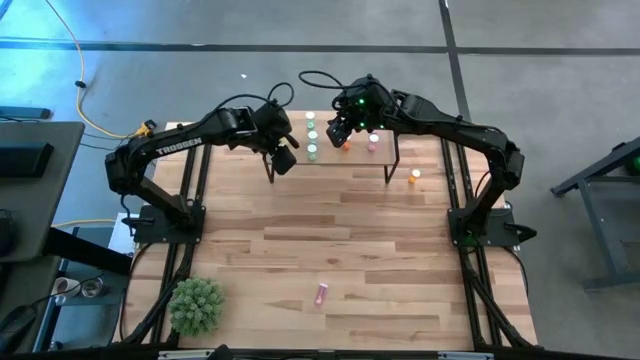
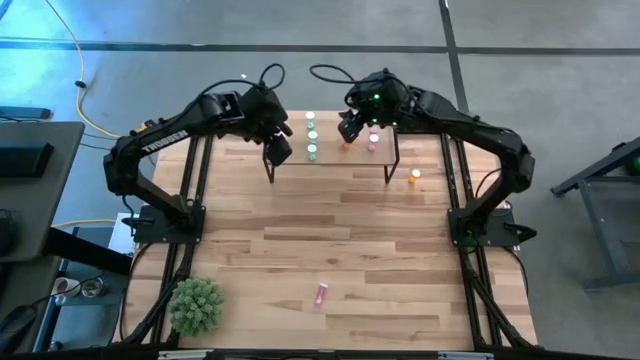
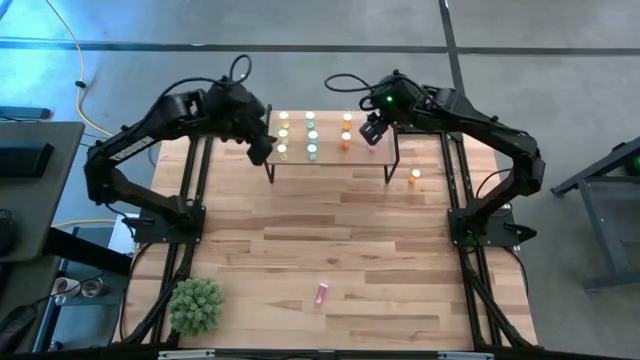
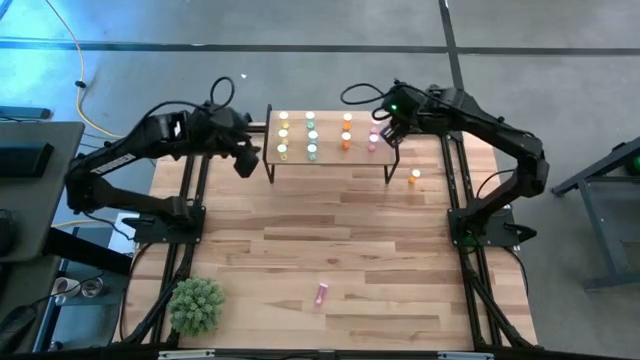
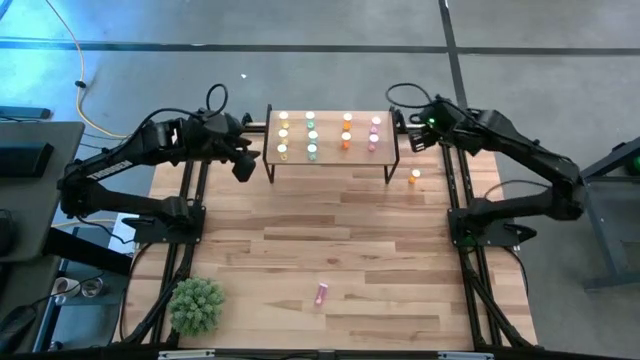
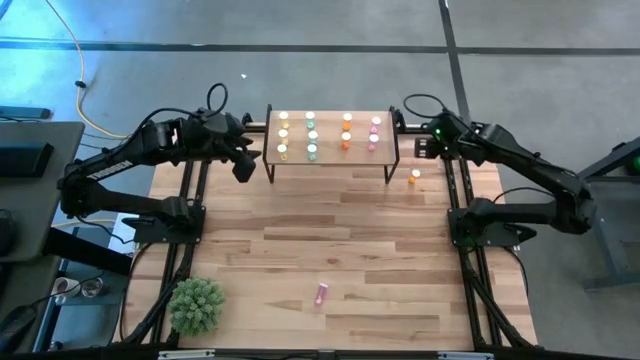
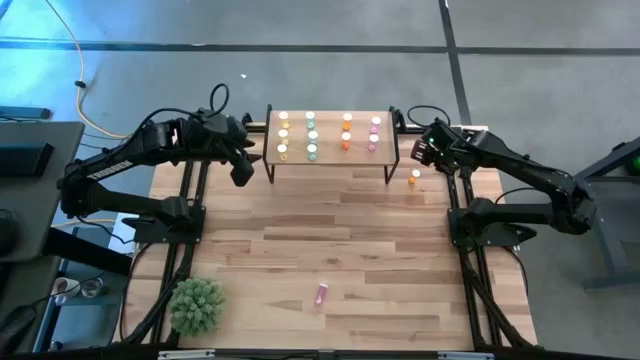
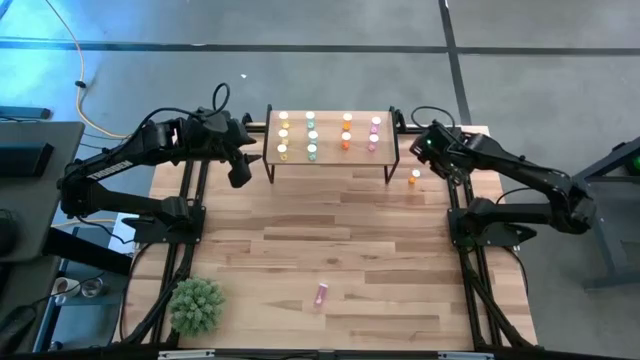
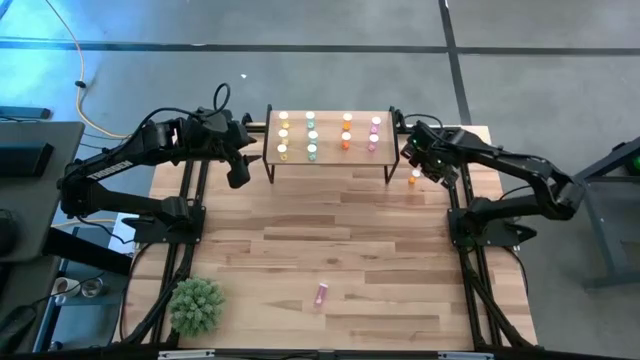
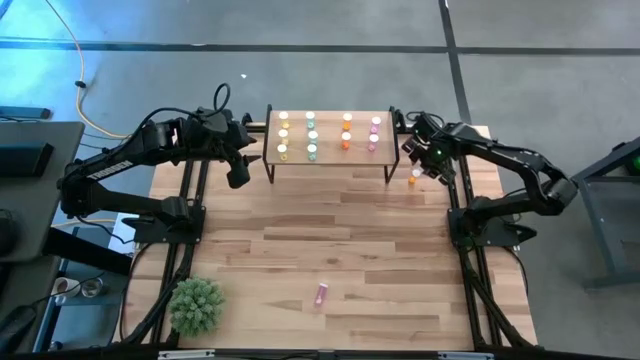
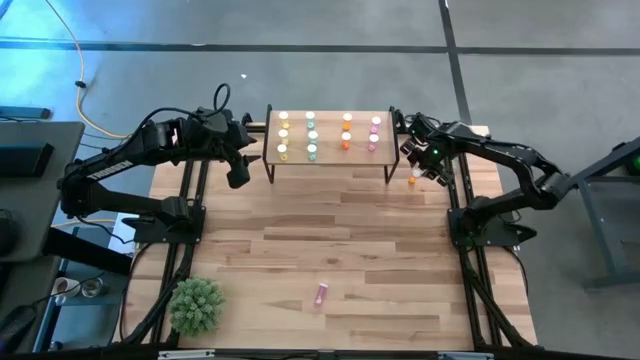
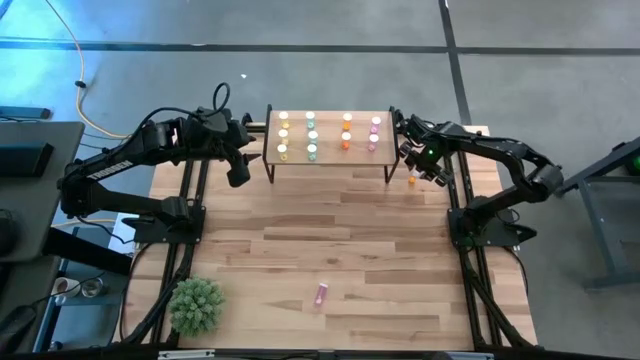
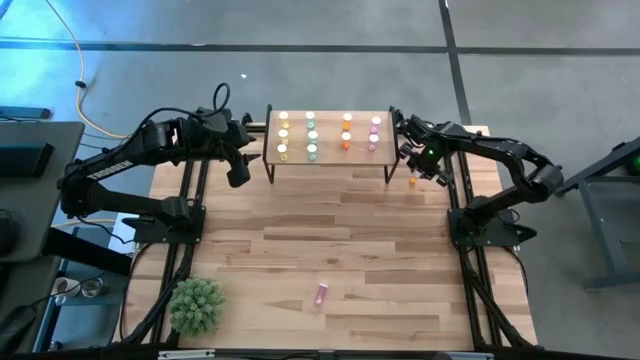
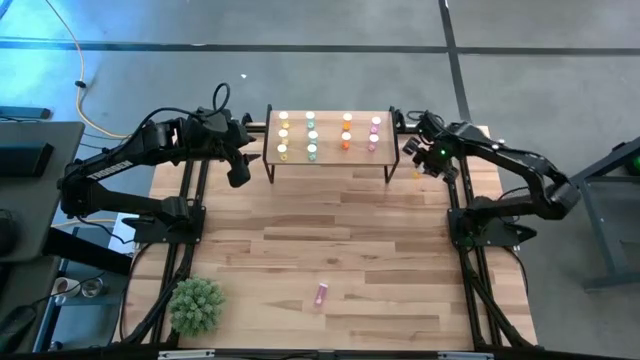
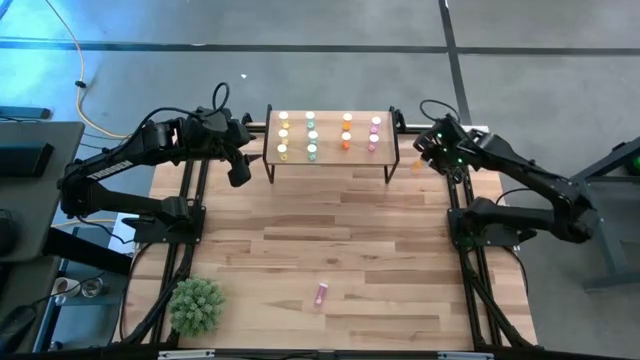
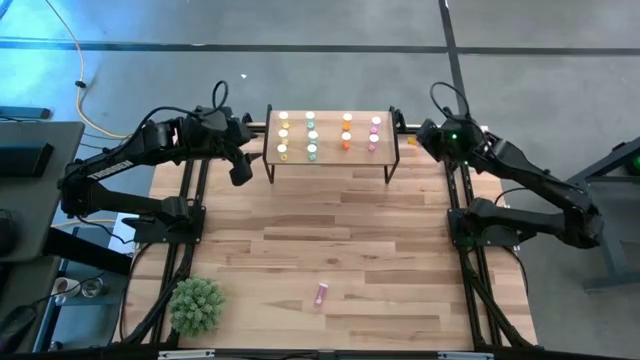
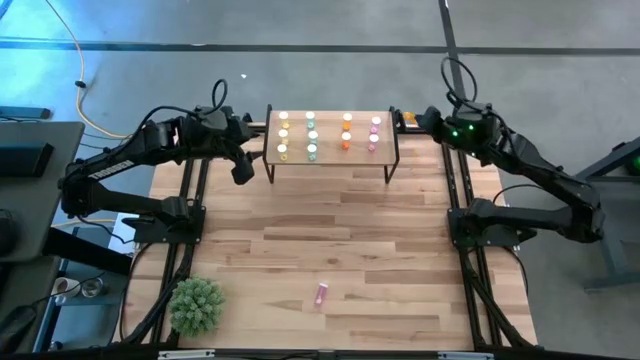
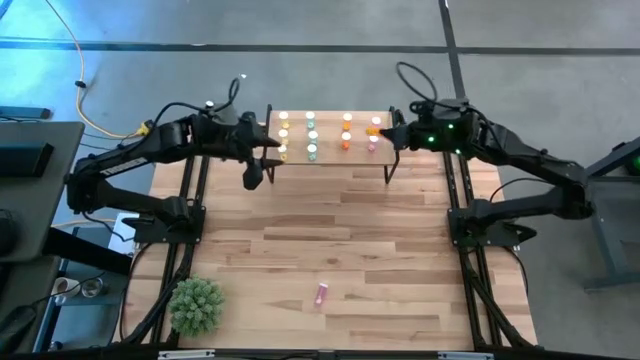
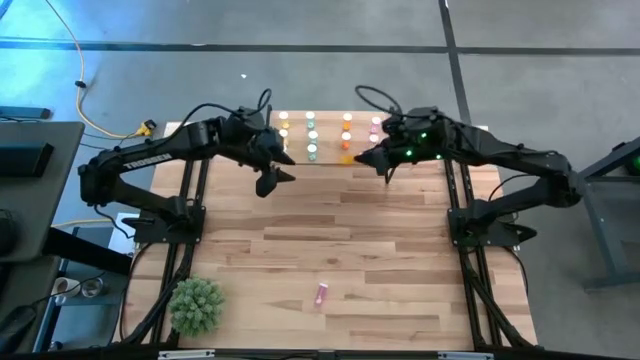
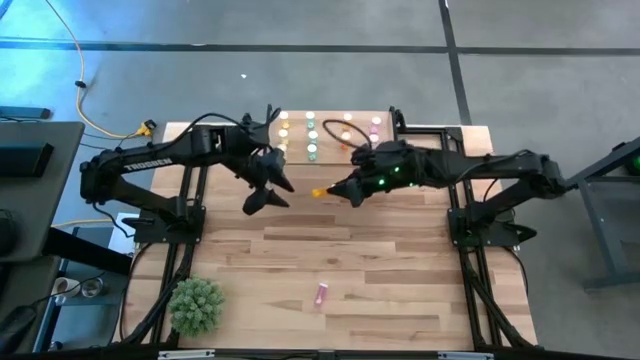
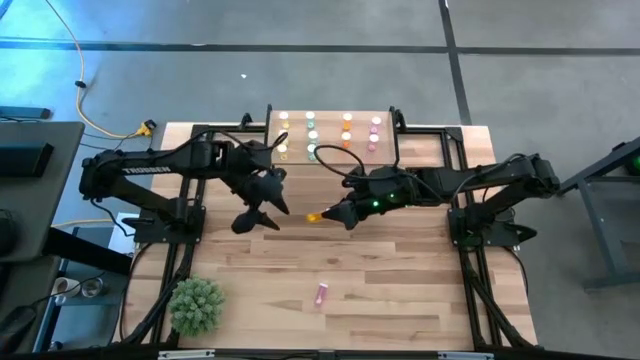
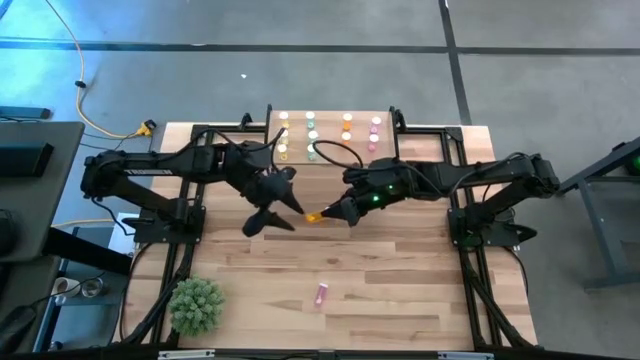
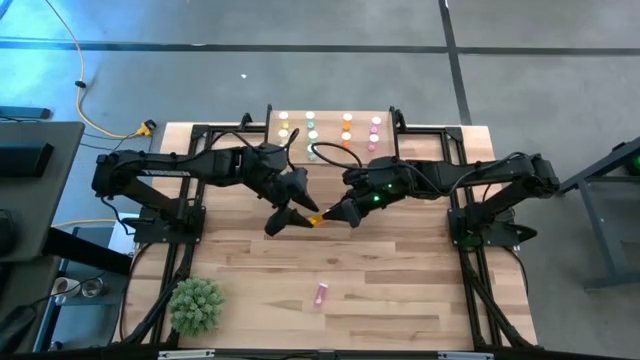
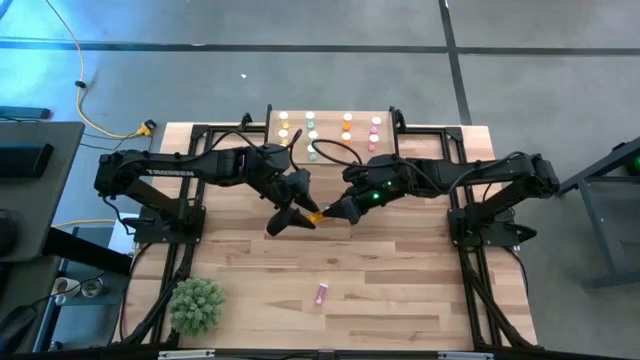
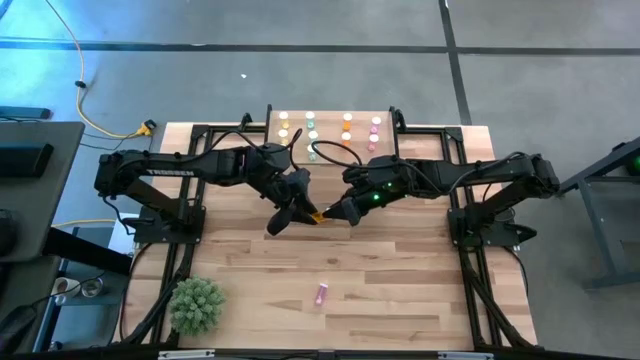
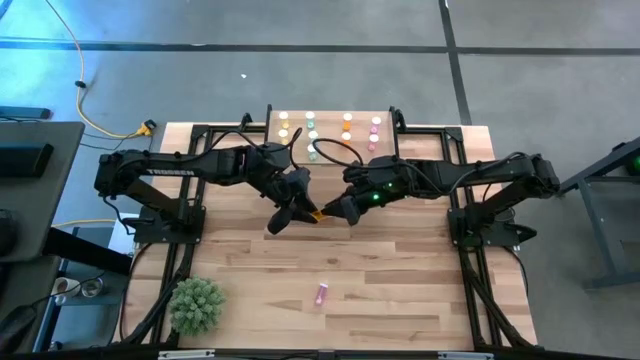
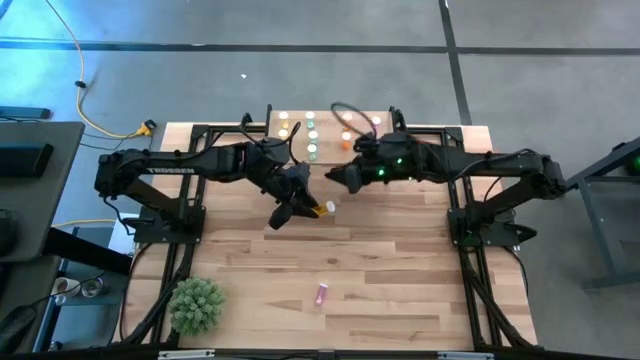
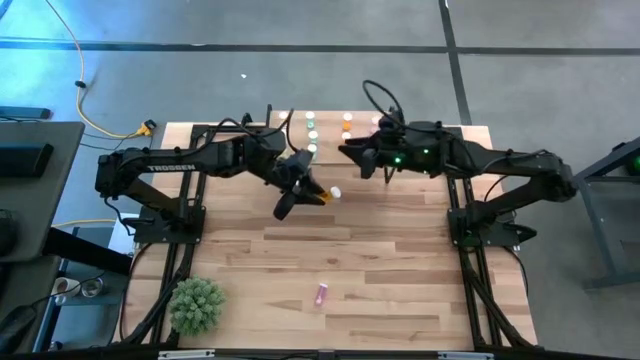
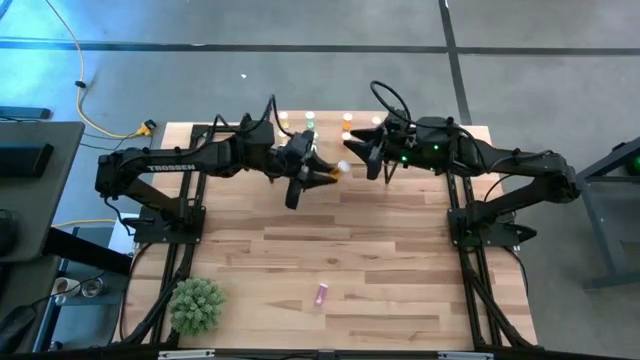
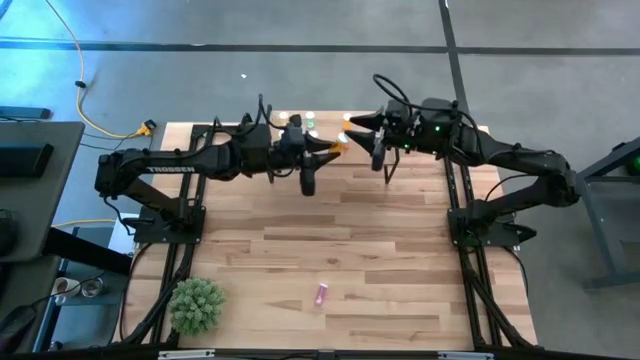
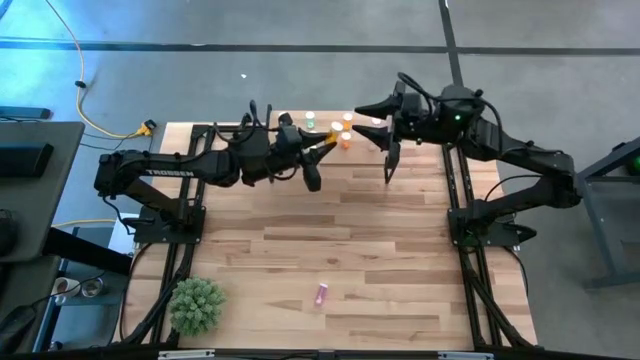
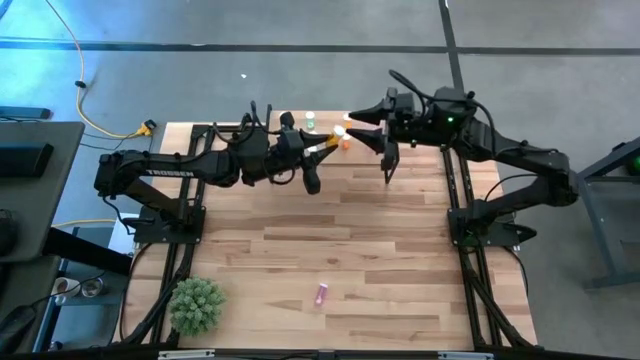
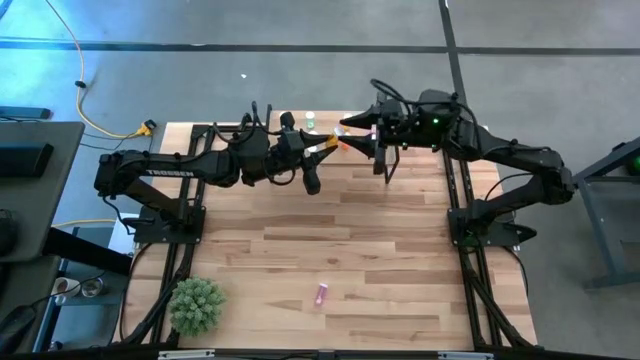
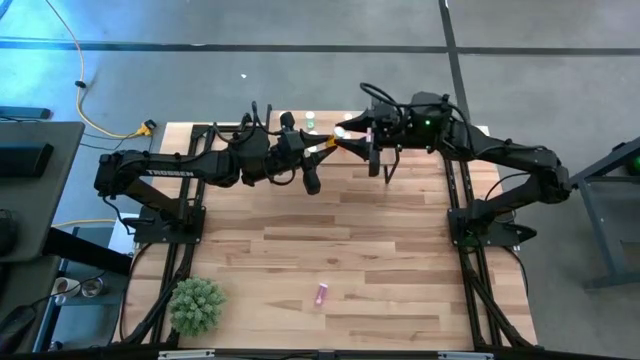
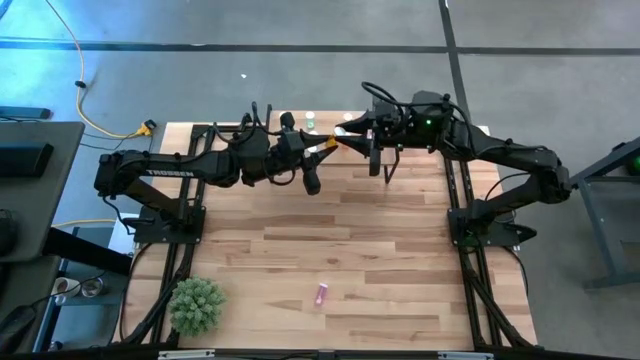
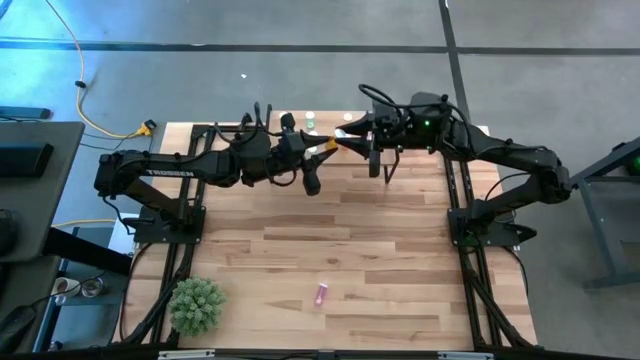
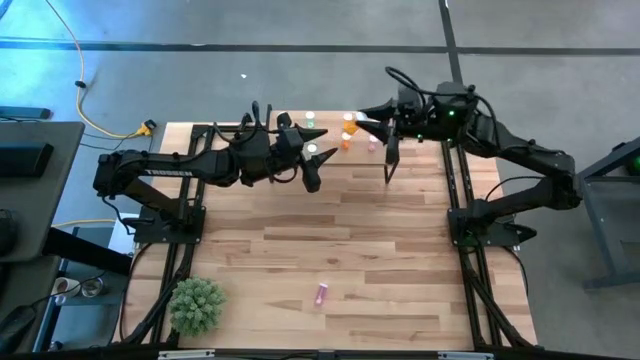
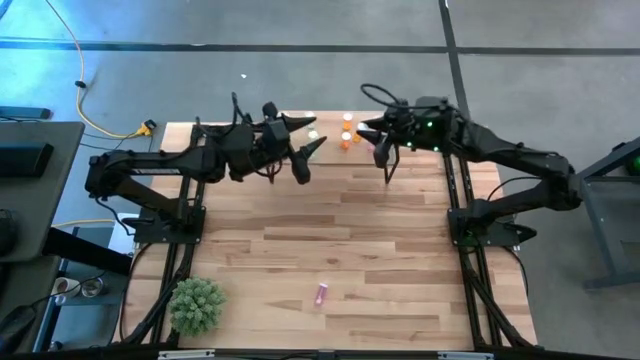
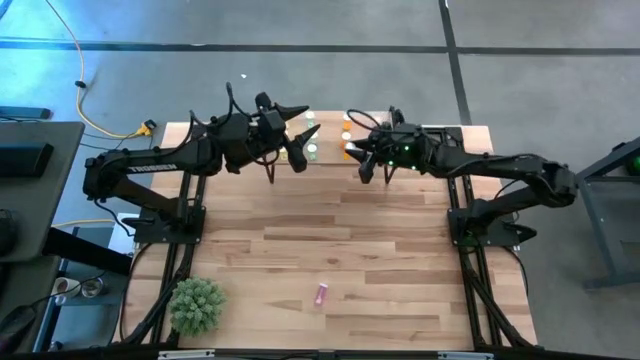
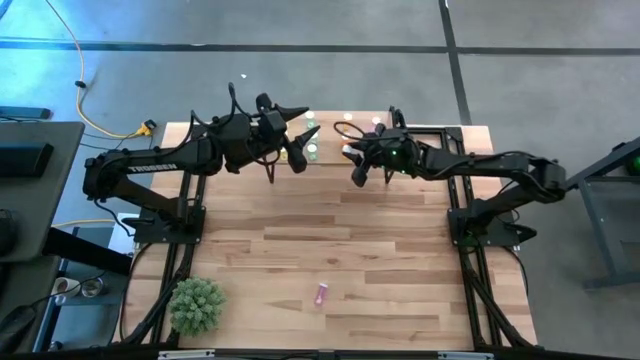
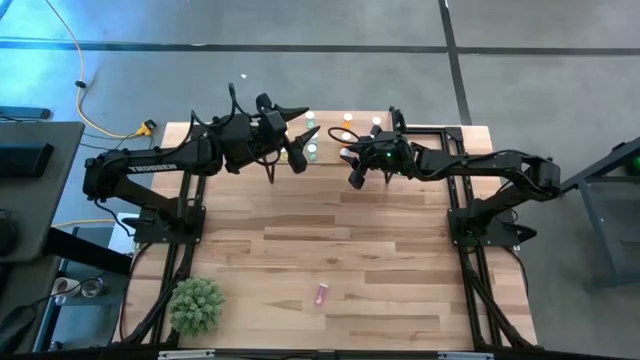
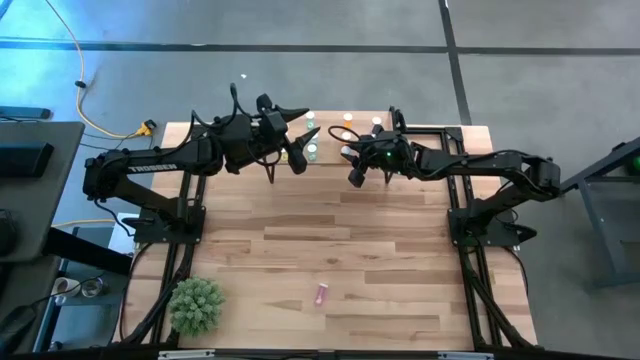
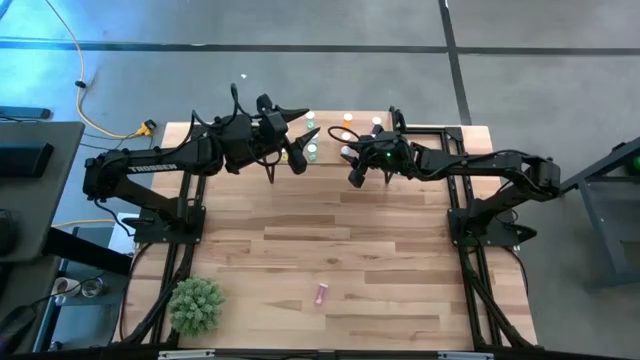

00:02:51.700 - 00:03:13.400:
Task: Pick and place medicine bottles onto shelf by color
Put the orange pill bottle on the shelf aligned with the other orange pill bottles

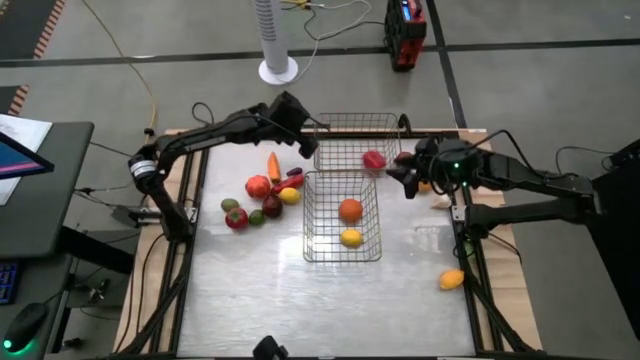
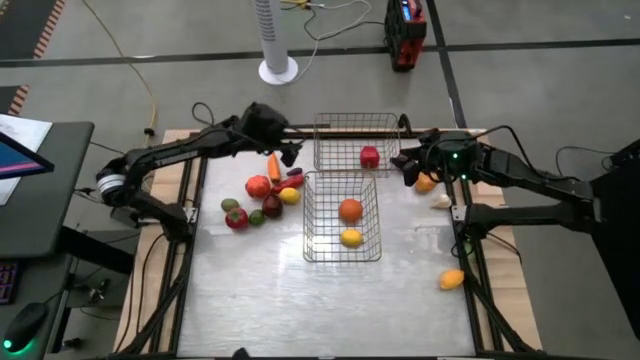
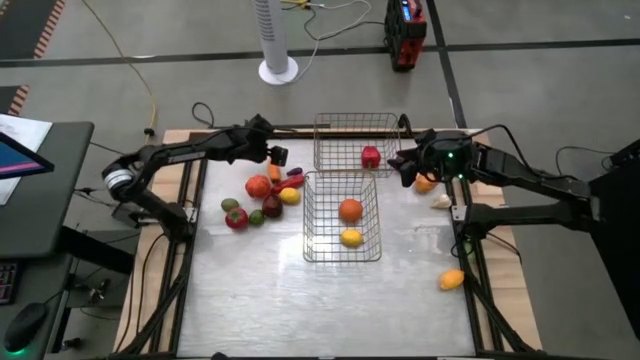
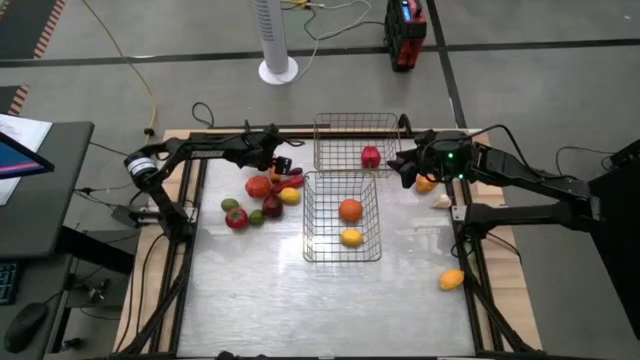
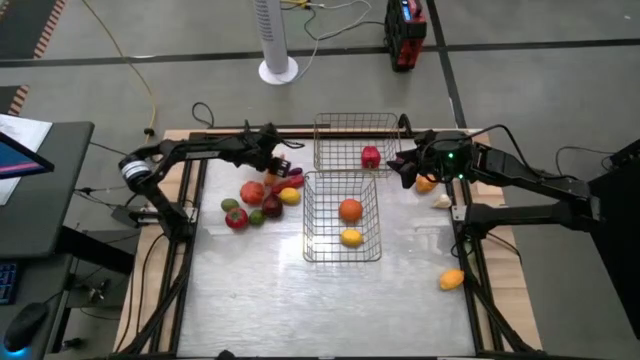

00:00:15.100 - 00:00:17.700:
Task: Sort produce into baskets
Put the orange chili pepper into the top wire basket
